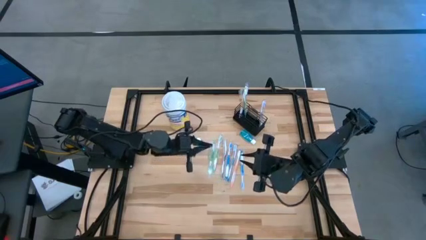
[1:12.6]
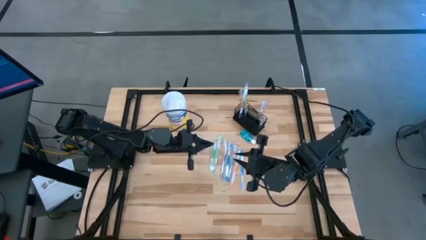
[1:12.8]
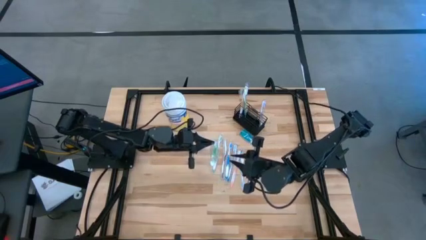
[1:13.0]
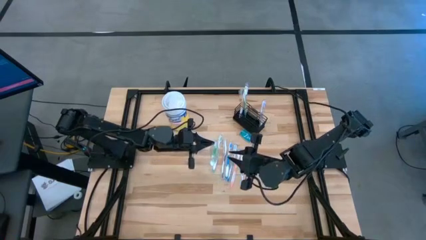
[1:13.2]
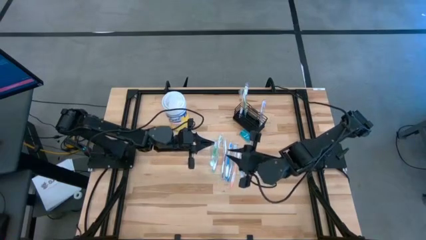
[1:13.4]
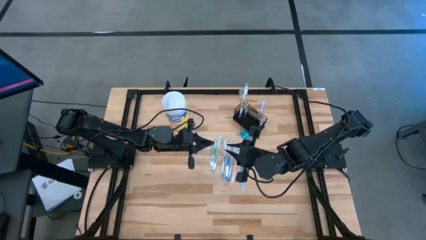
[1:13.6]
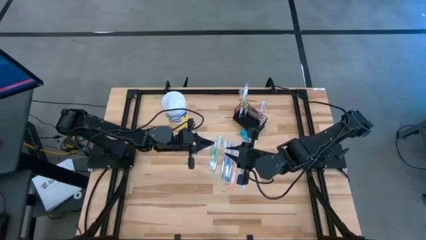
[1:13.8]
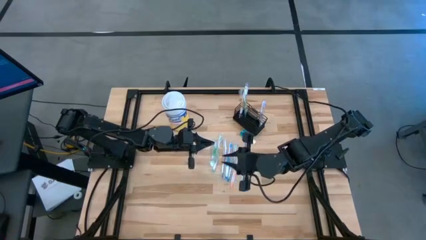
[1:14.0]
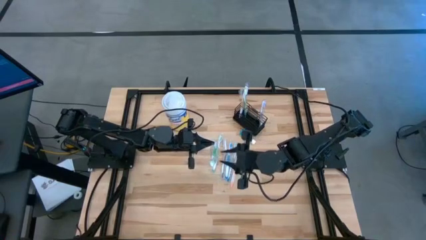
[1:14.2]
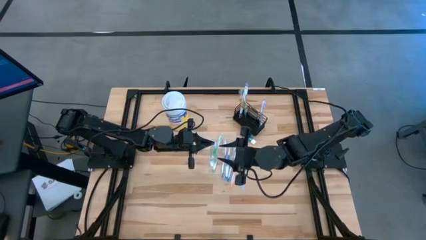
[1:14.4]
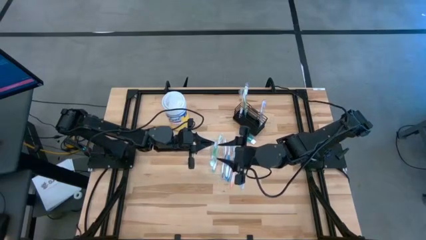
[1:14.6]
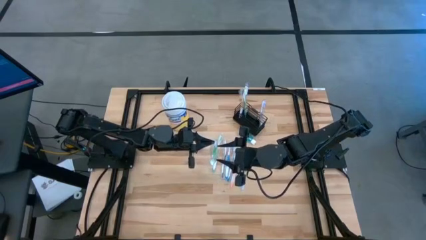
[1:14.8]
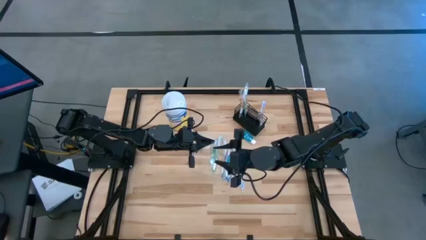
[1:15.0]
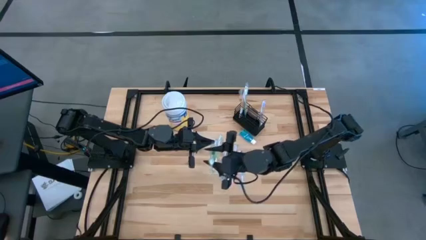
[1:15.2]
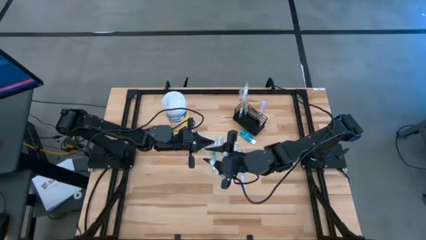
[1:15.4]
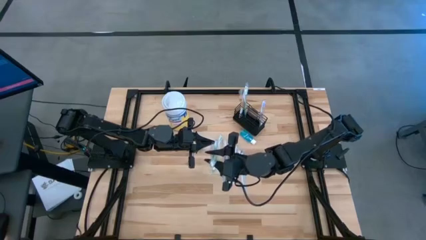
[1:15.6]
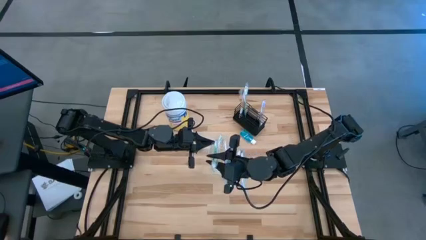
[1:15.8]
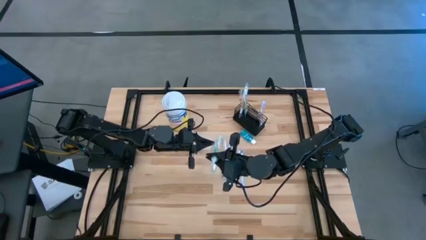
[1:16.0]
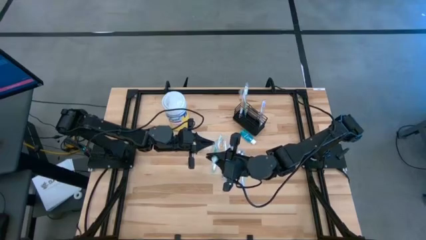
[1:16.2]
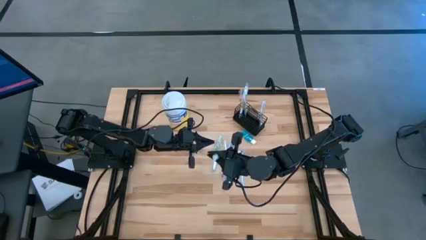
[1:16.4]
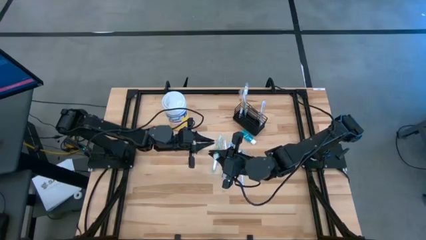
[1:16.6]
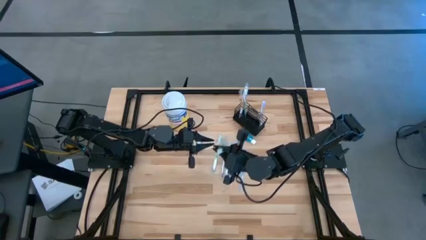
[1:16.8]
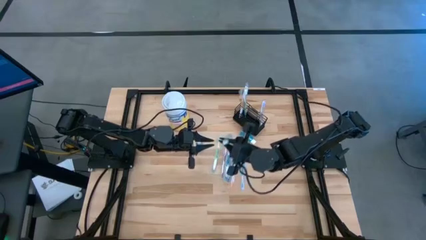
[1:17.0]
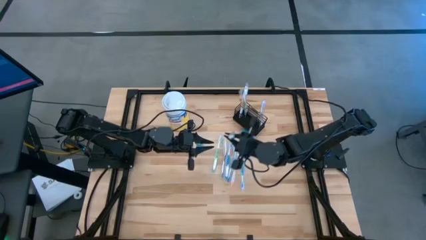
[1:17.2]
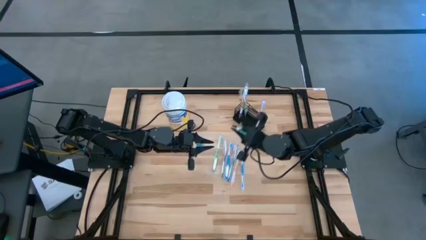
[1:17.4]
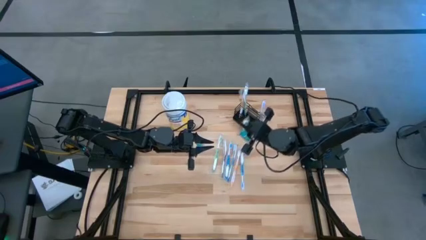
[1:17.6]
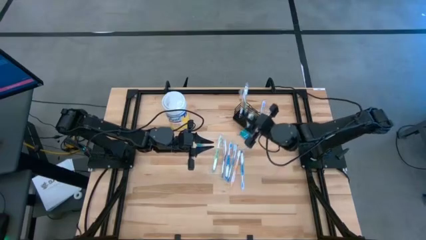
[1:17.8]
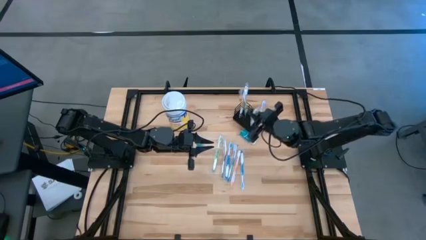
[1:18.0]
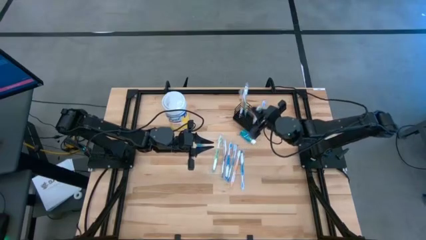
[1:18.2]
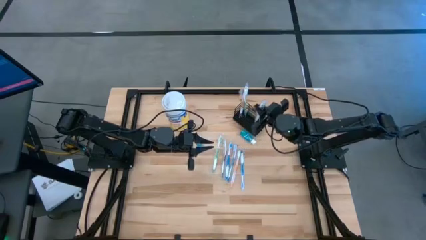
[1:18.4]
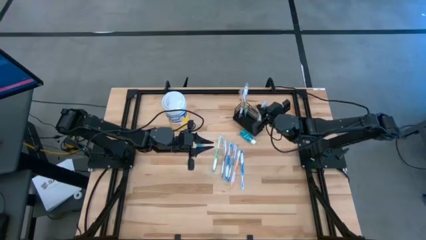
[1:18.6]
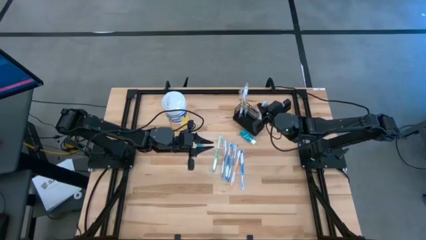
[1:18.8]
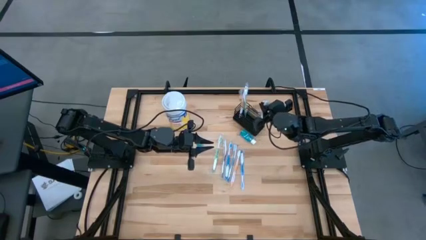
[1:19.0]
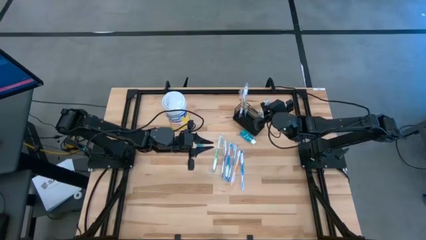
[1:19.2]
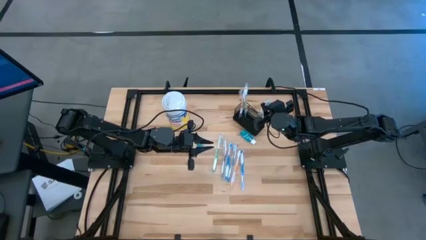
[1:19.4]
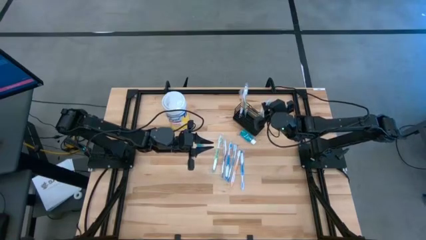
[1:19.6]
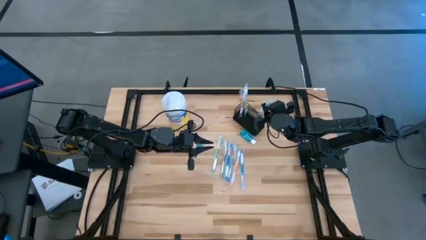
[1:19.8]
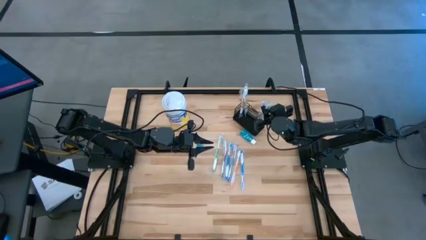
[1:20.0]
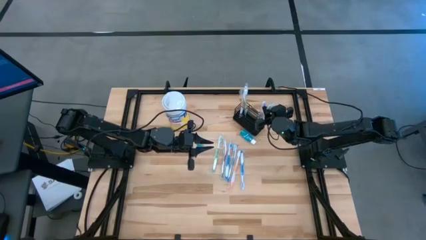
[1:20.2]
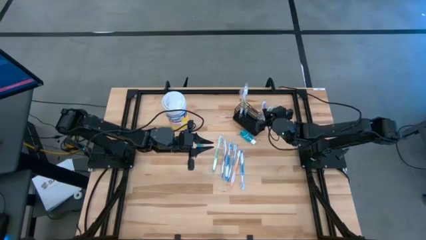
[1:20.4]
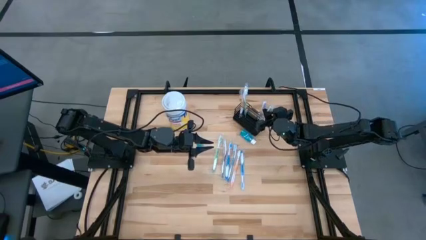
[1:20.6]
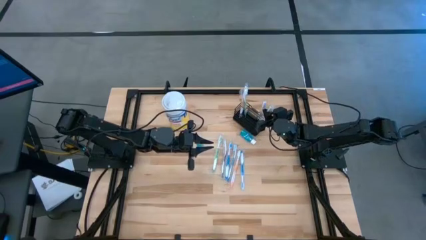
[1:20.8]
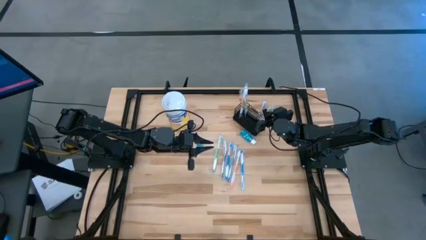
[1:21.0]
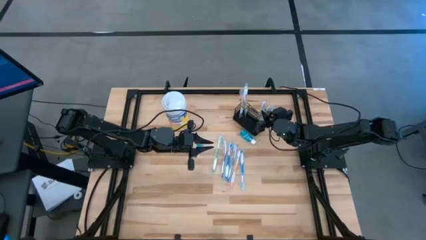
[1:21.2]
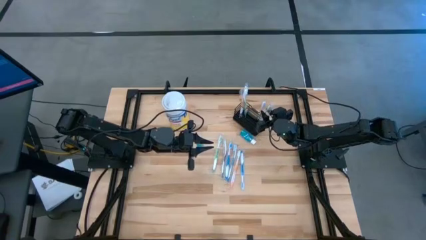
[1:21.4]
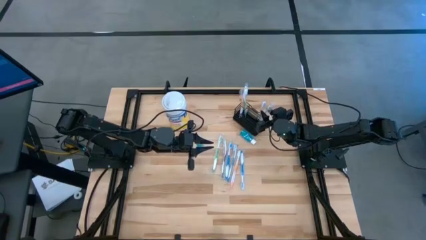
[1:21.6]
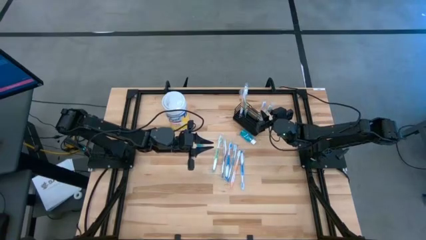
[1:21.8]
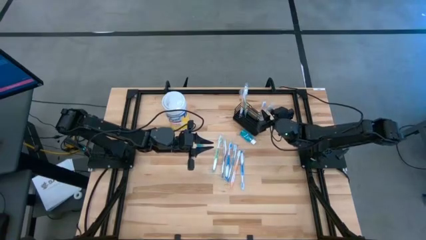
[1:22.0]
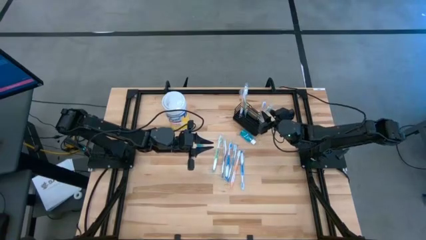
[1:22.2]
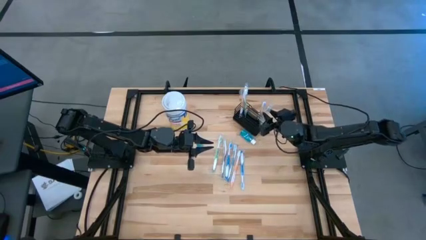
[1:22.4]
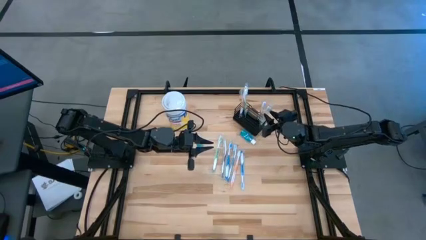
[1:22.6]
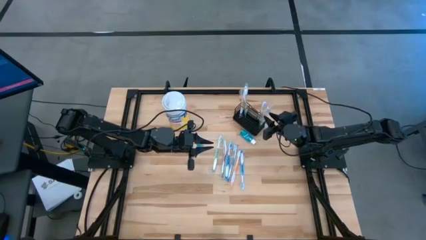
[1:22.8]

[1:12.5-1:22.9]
Task: Pick & Place toothbrushing station
Put the right green toothbrush into the black wire organizer

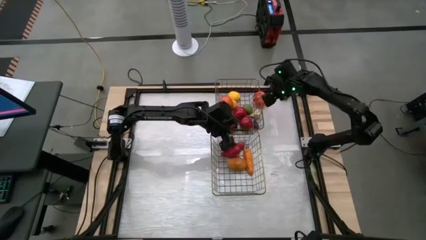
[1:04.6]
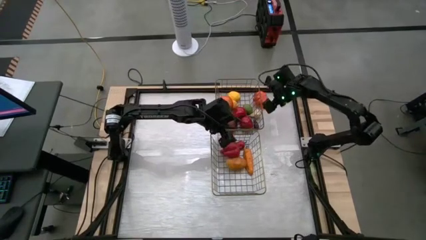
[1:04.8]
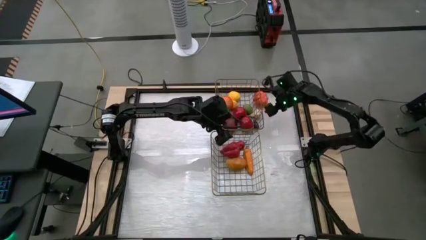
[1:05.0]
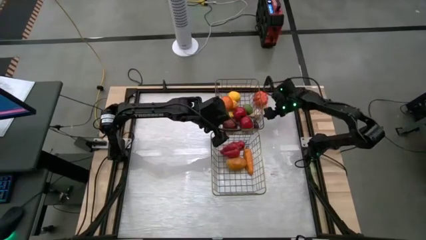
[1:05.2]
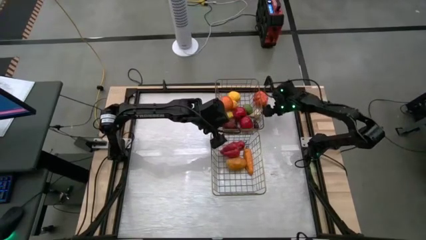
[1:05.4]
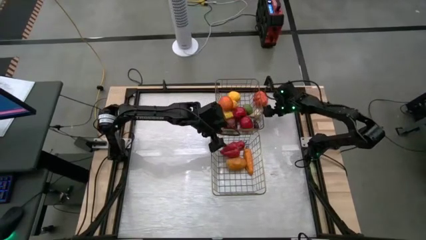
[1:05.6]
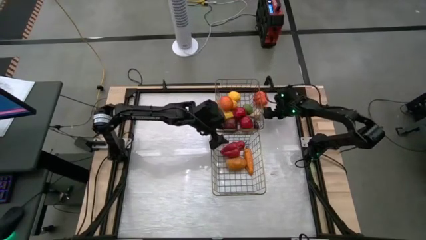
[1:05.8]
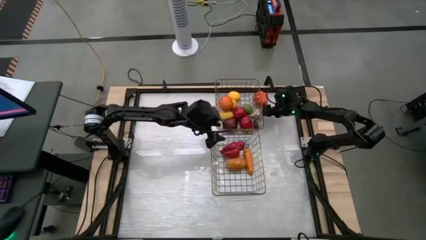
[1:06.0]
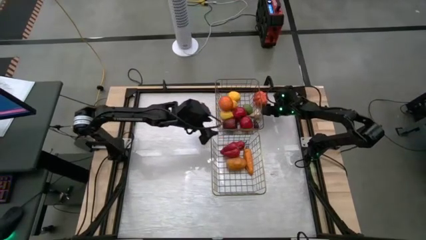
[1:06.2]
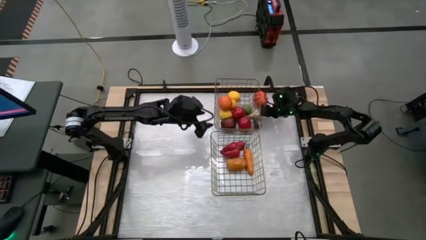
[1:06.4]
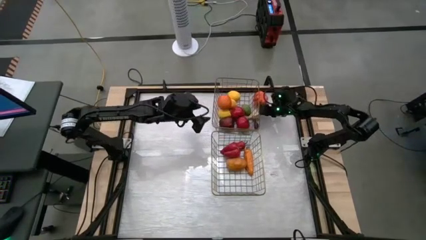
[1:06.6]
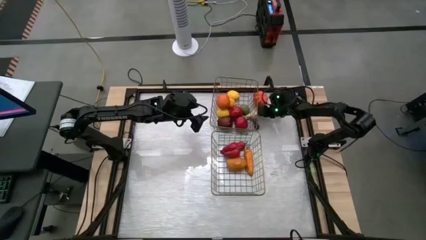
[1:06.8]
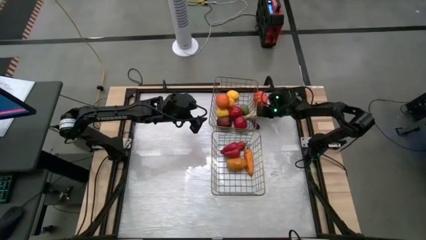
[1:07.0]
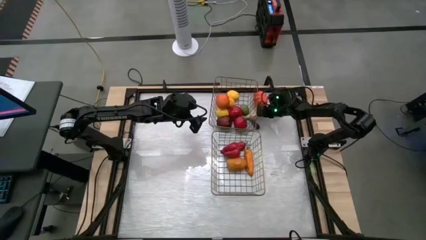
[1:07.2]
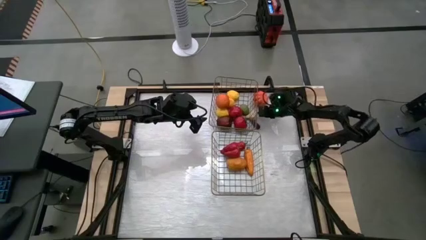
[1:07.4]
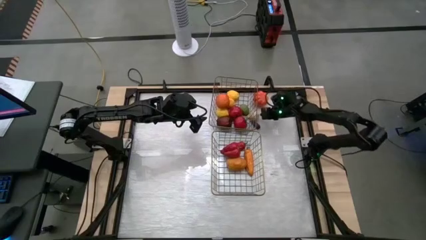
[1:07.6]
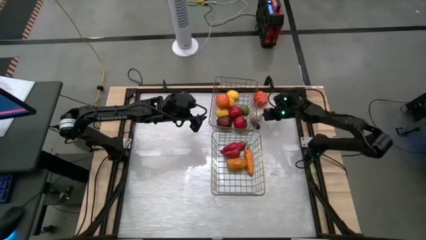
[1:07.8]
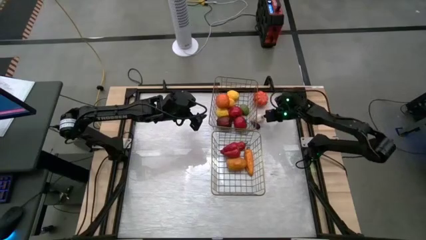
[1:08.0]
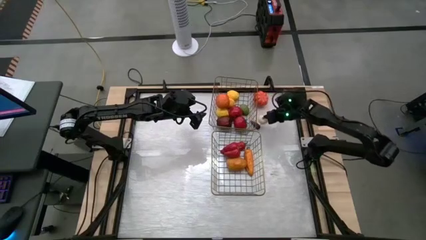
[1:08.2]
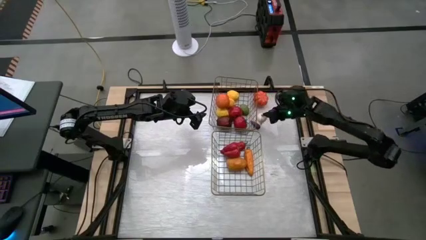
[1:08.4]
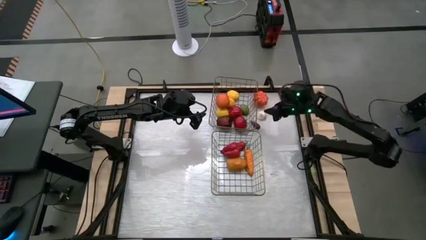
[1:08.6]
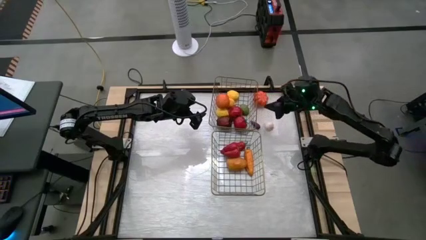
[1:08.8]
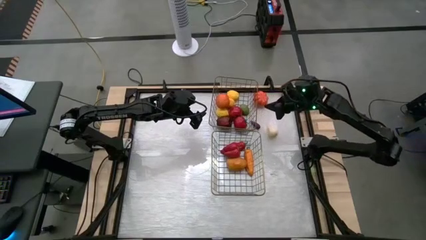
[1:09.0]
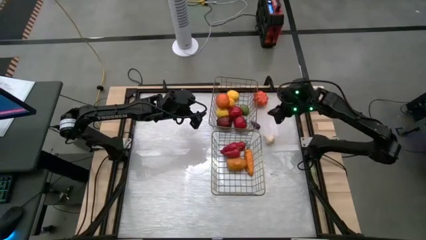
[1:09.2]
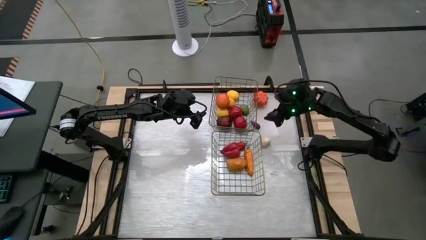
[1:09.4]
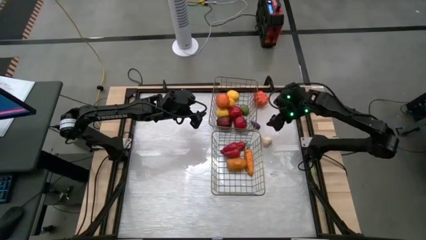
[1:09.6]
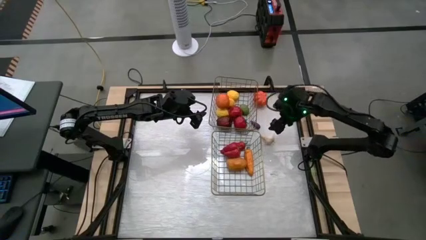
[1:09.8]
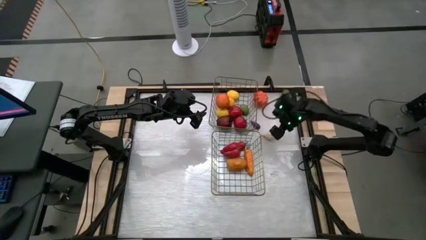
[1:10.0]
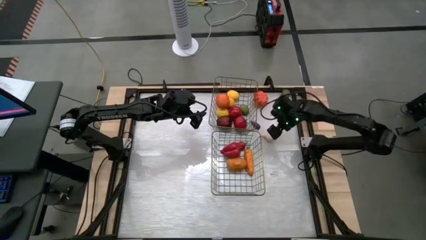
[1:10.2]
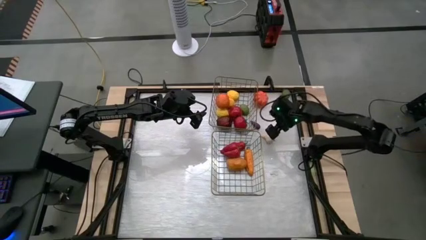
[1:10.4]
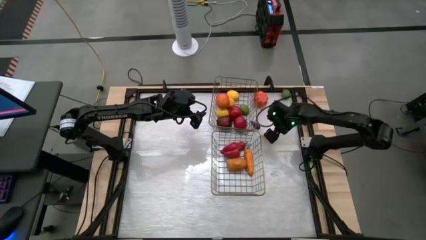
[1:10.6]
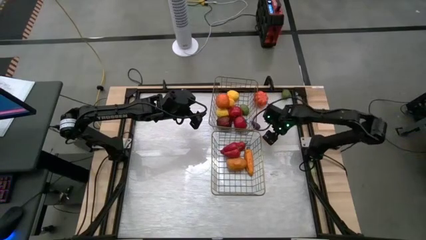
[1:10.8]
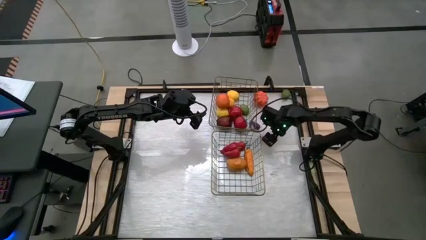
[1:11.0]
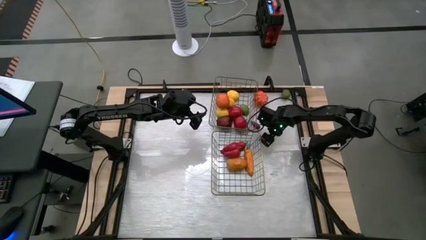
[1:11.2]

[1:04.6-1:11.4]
Task: Sort produce into baskets
Put the white garlic into the bottom wire basket

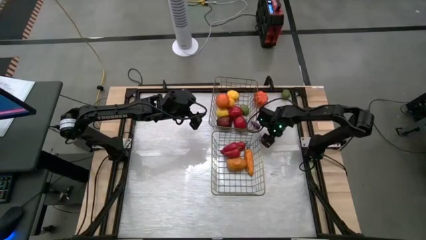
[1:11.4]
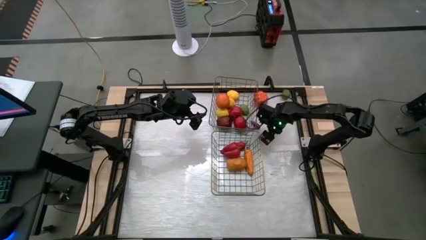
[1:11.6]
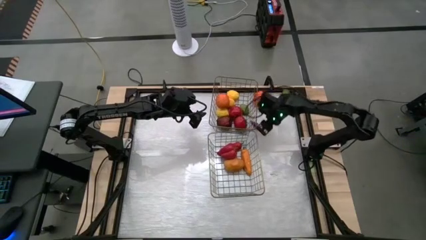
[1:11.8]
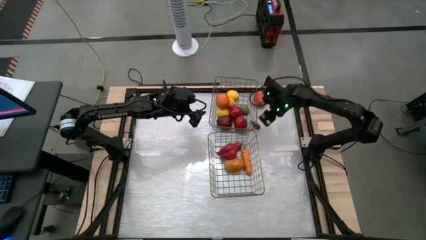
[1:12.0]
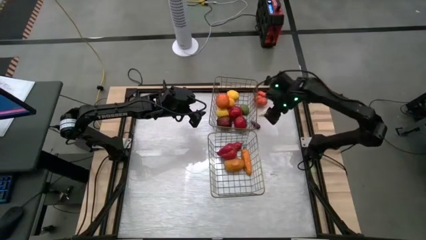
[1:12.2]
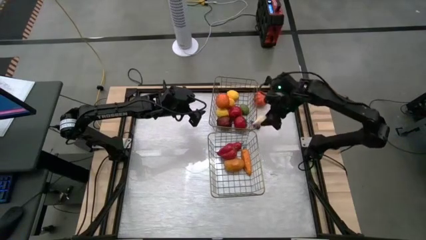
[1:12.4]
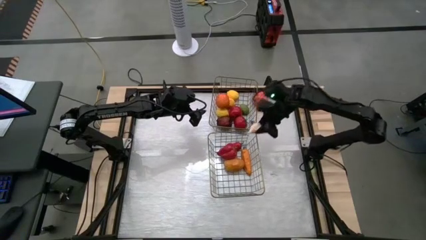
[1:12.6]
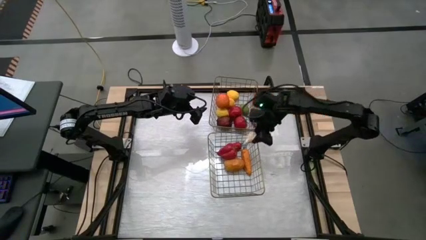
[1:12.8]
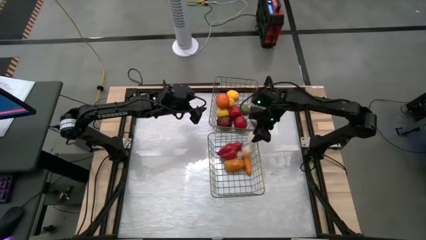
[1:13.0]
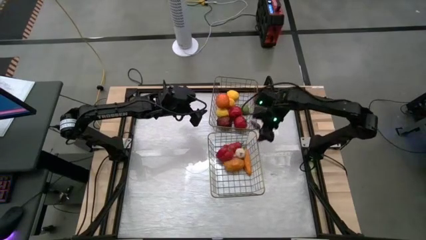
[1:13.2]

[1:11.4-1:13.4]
Put the white garlic into the bottom wire basket
